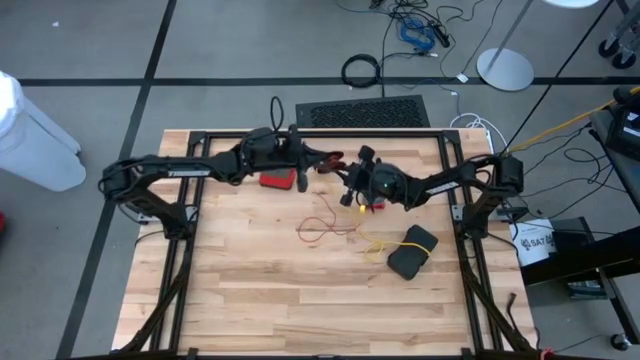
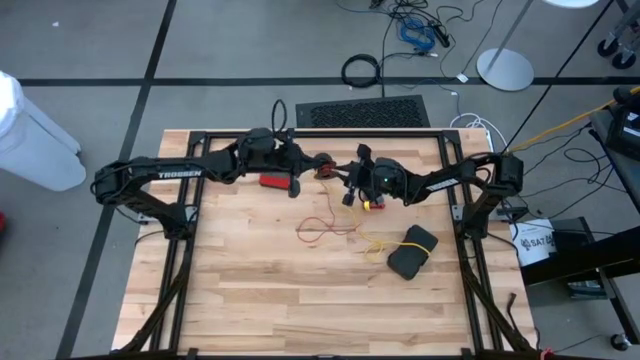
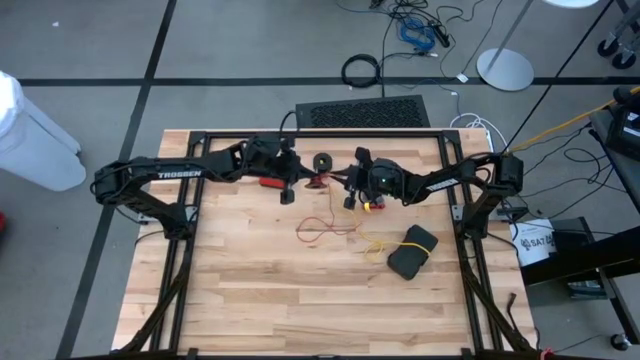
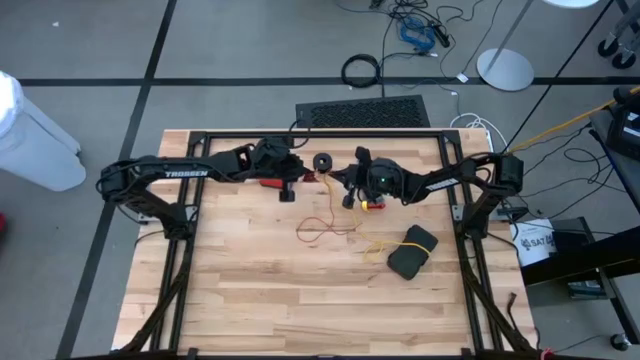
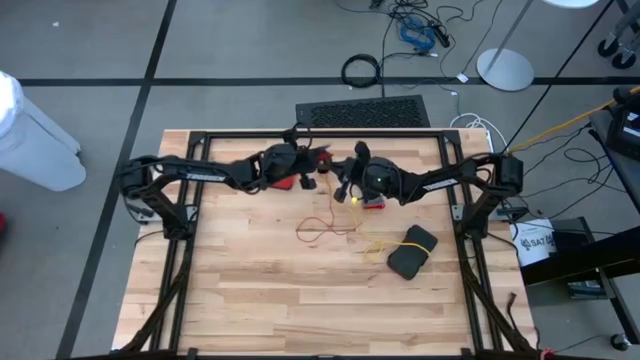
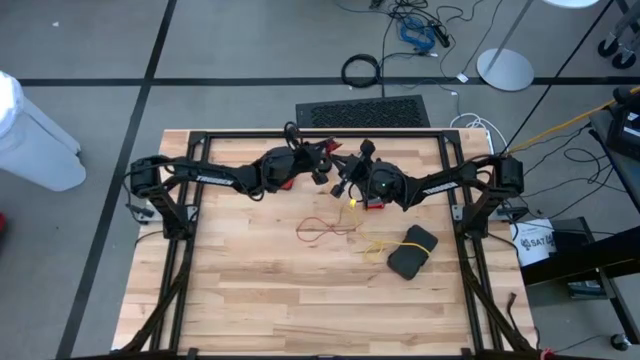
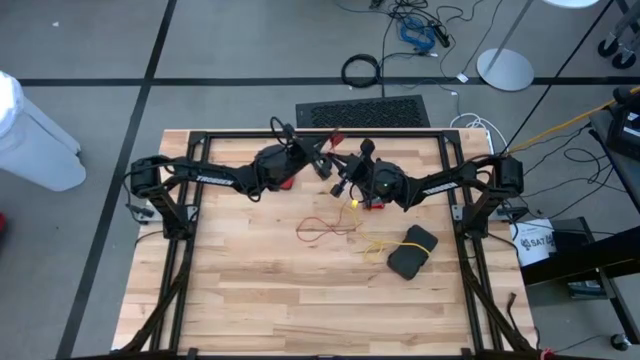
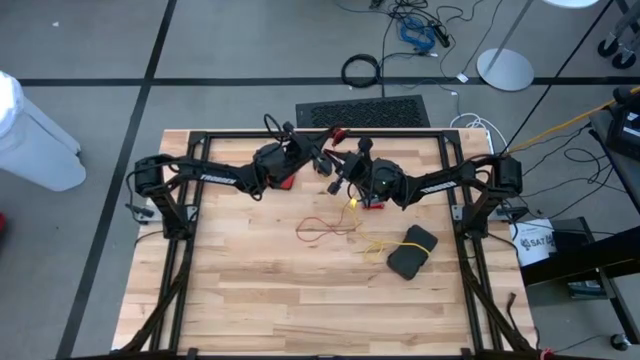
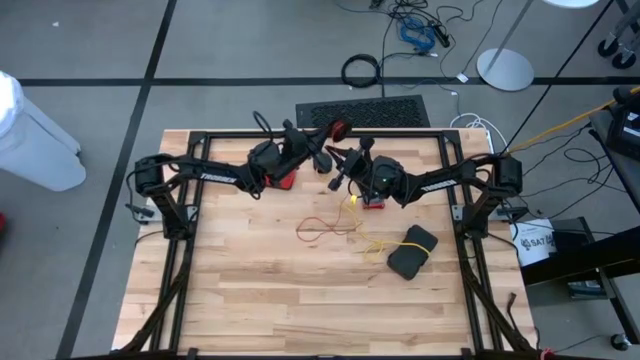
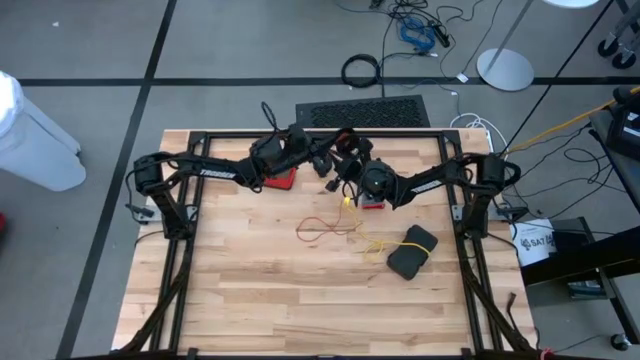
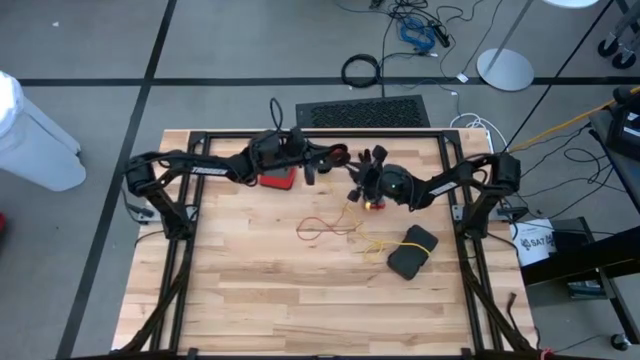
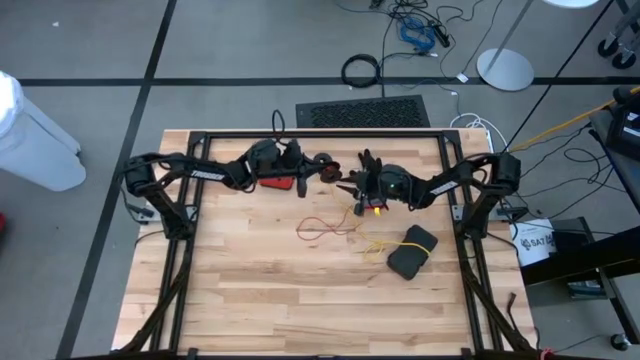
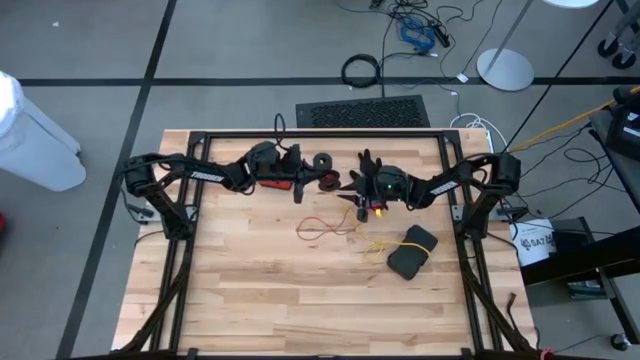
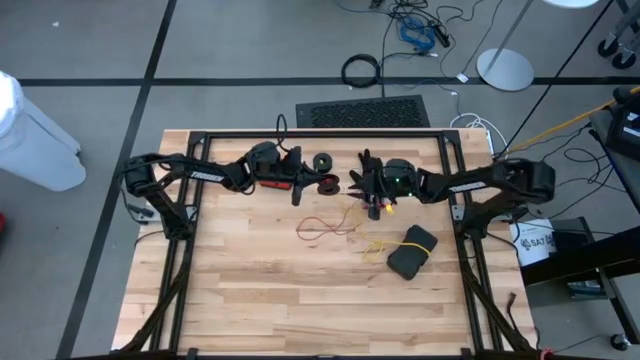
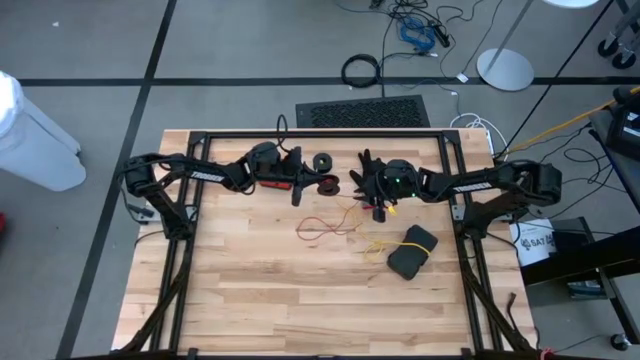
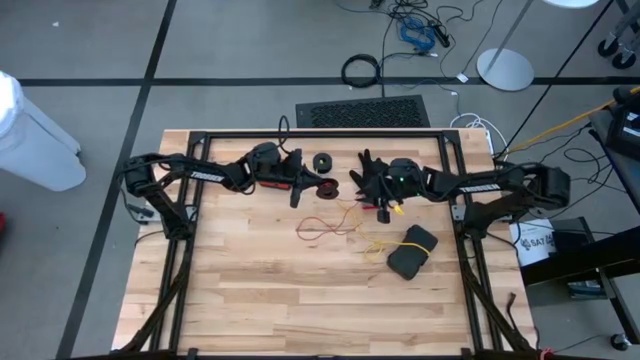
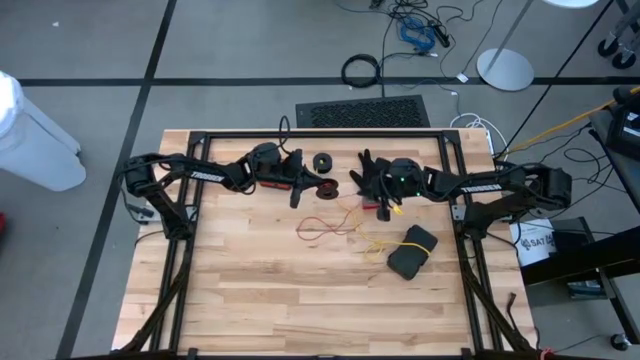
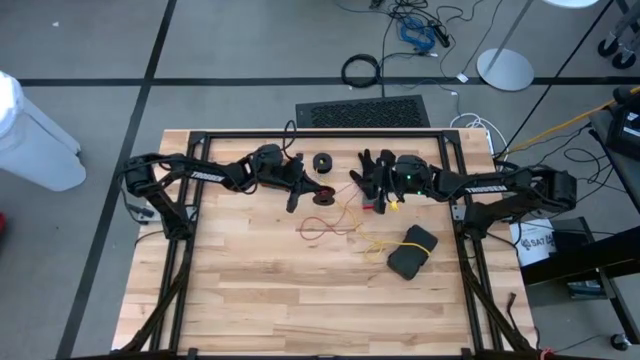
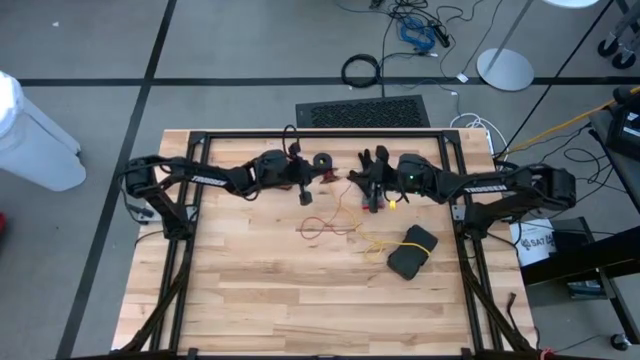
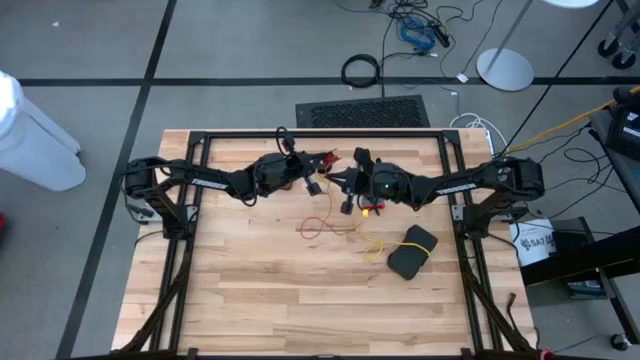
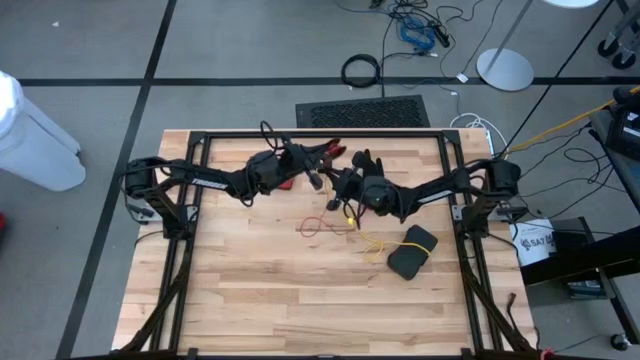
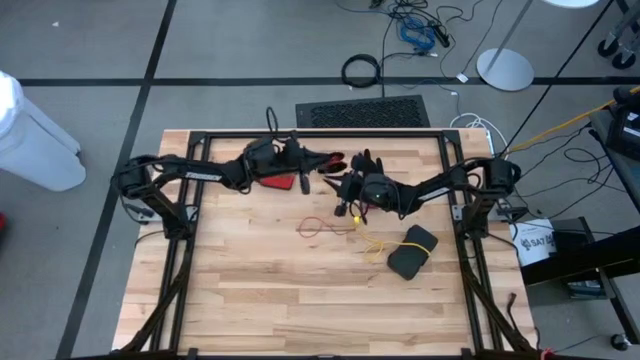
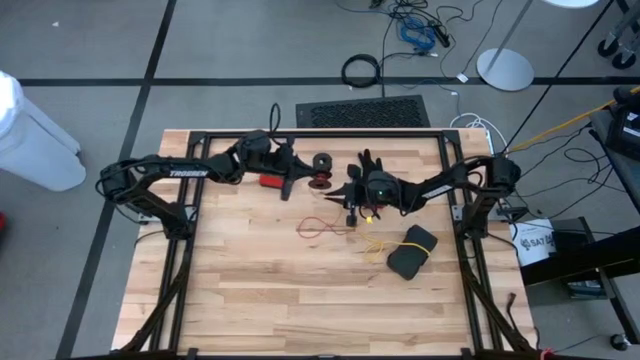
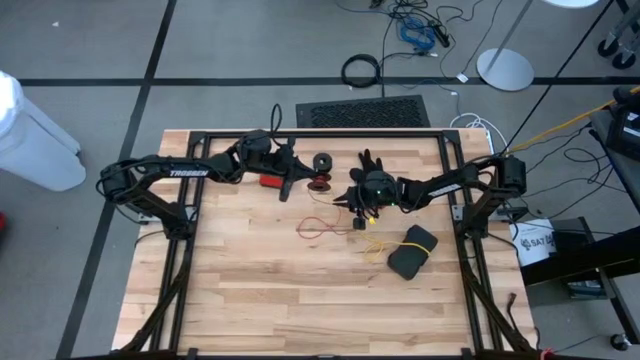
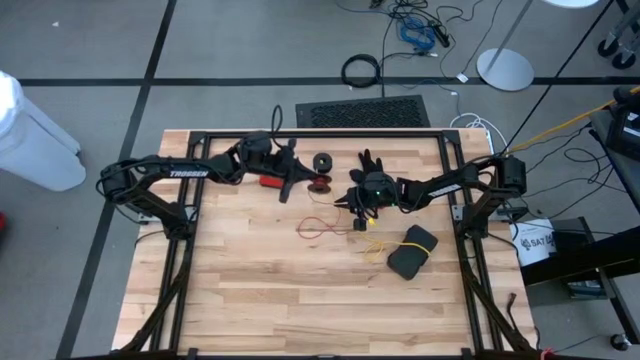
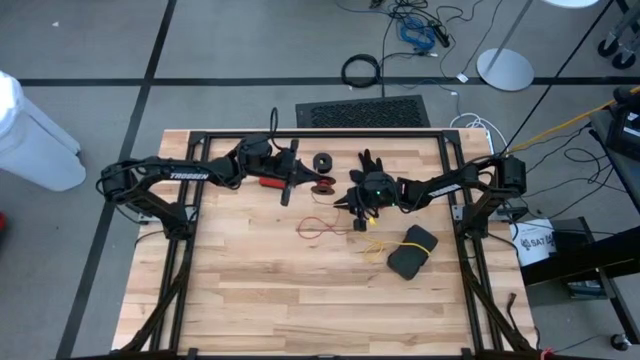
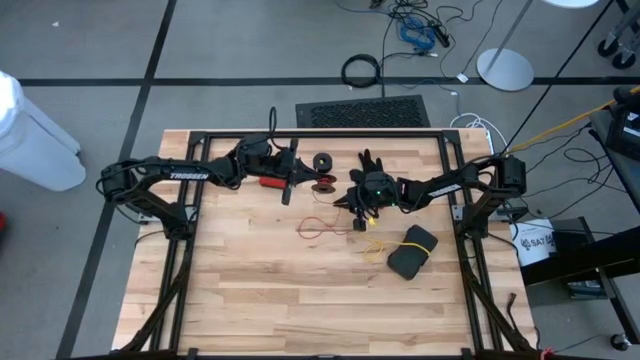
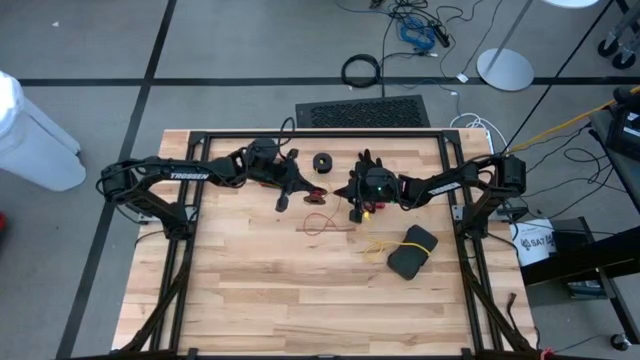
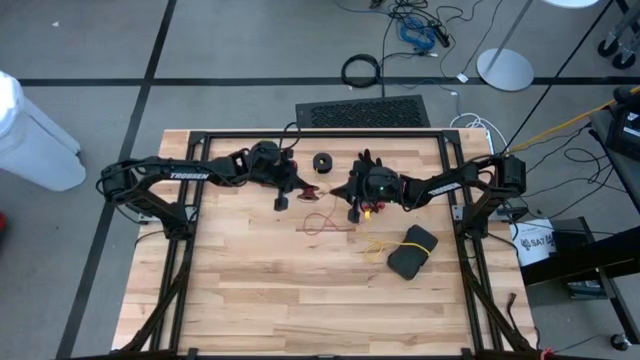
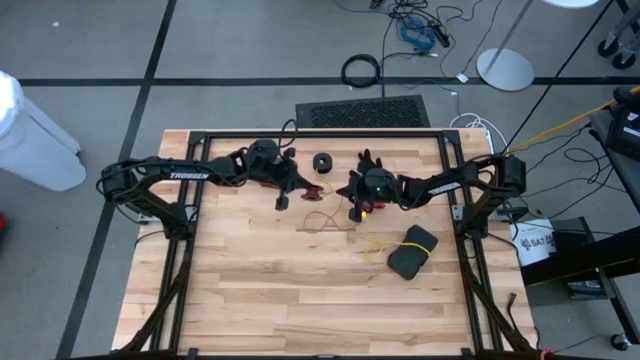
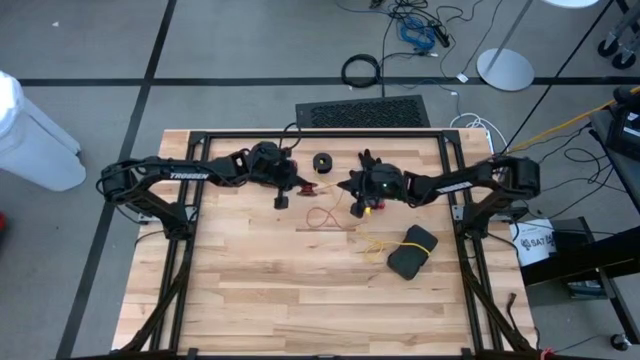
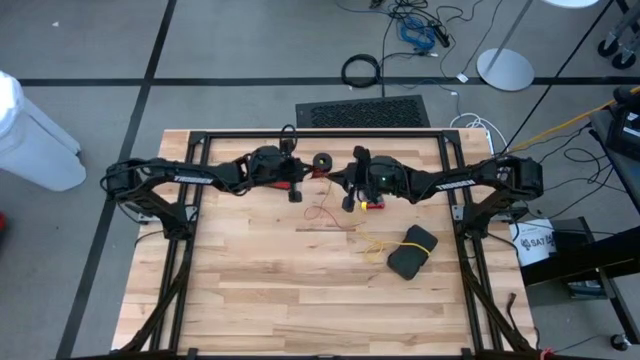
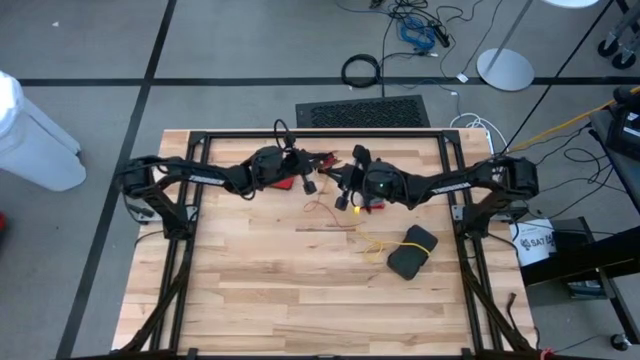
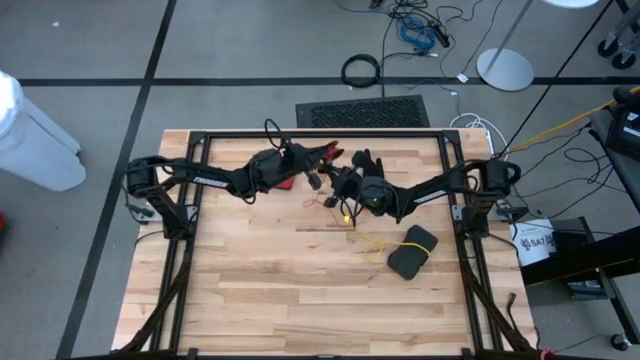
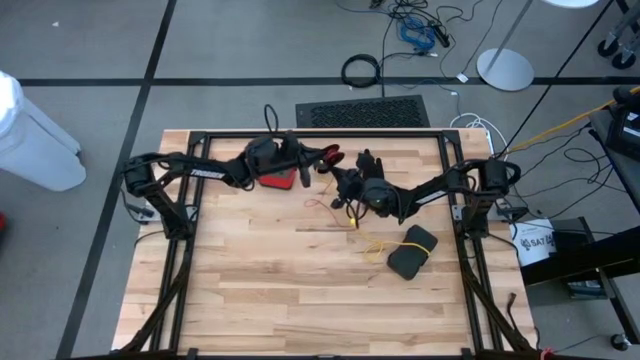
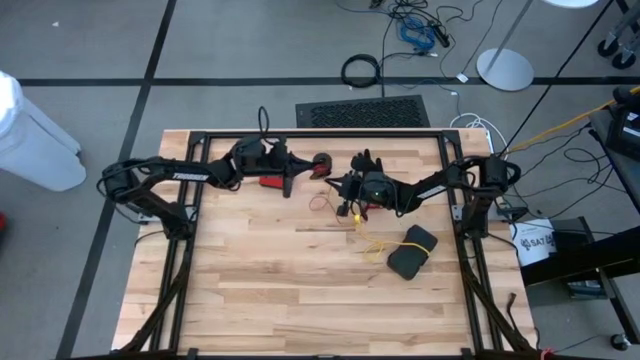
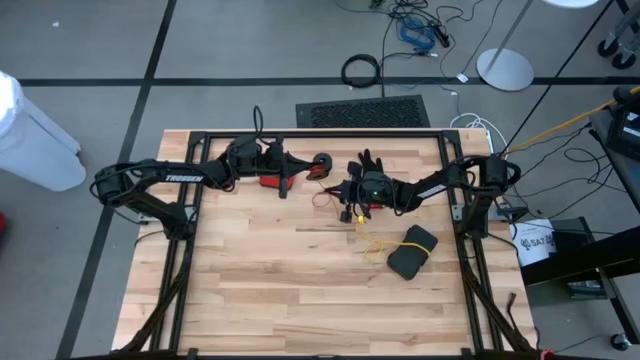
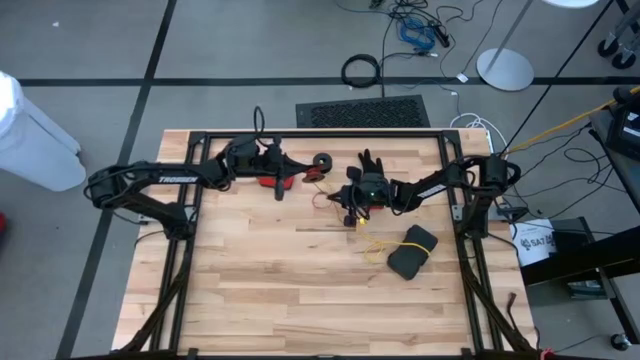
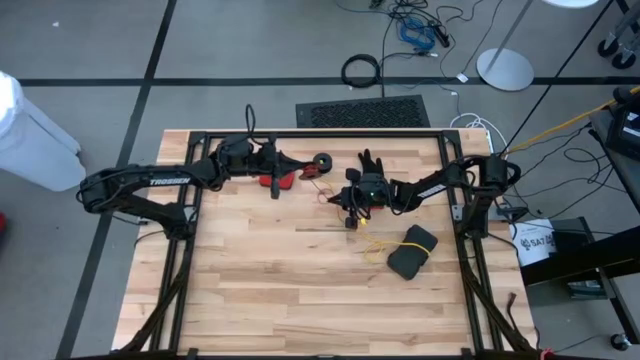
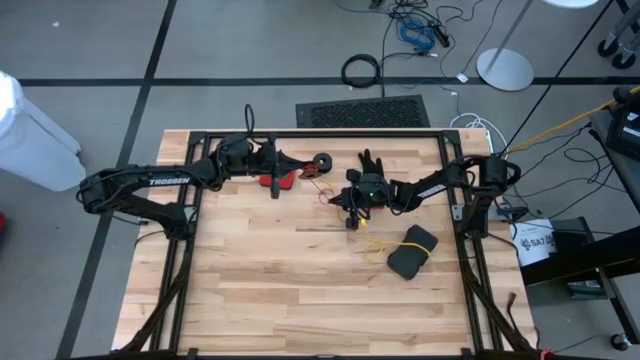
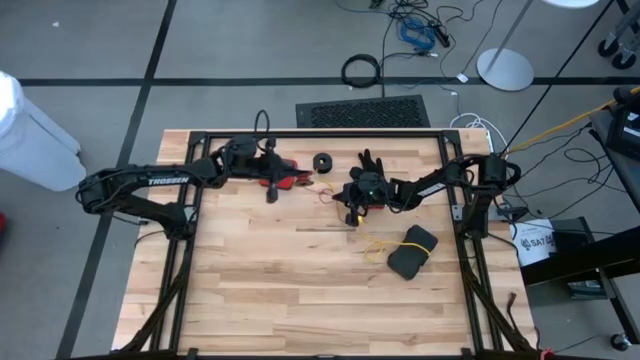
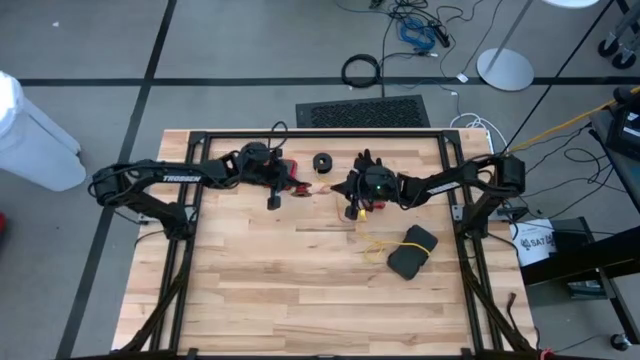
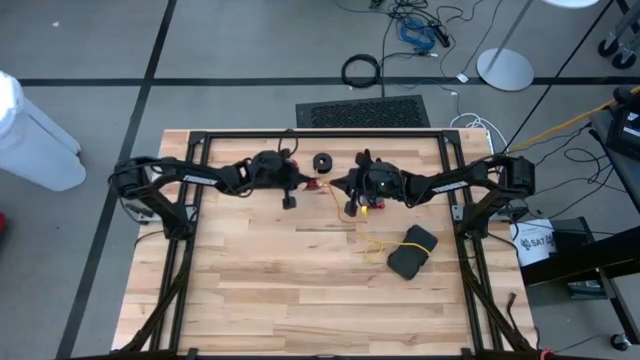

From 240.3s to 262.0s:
Task: Coil cords
Coil the red wire onto spool
